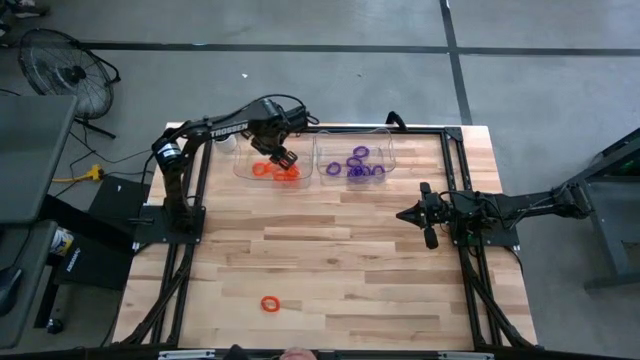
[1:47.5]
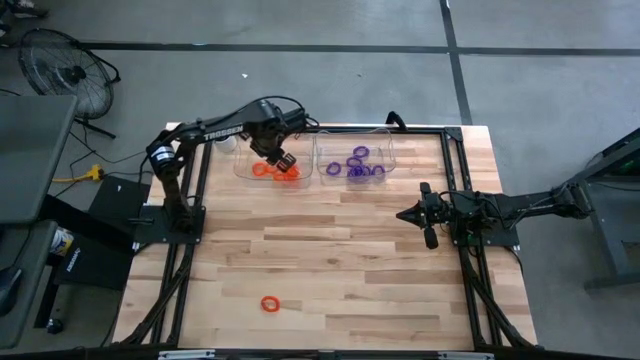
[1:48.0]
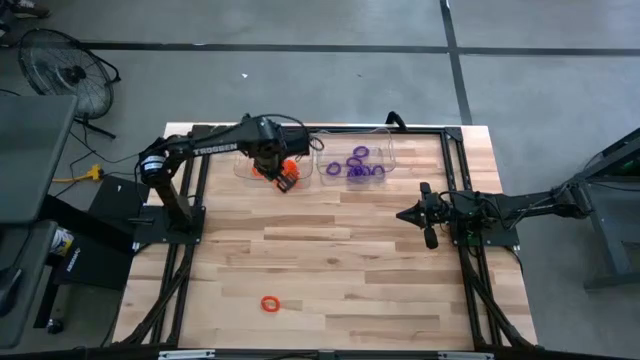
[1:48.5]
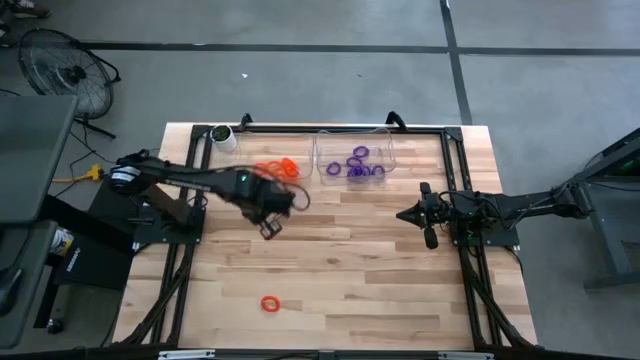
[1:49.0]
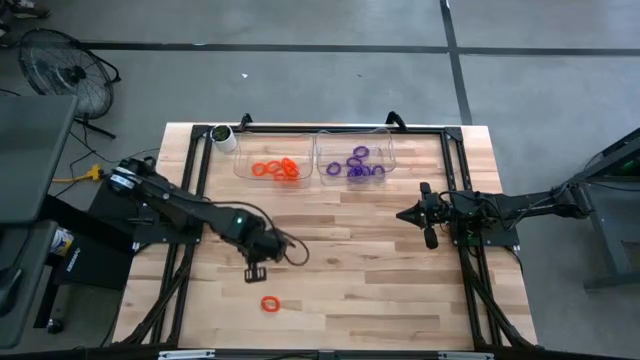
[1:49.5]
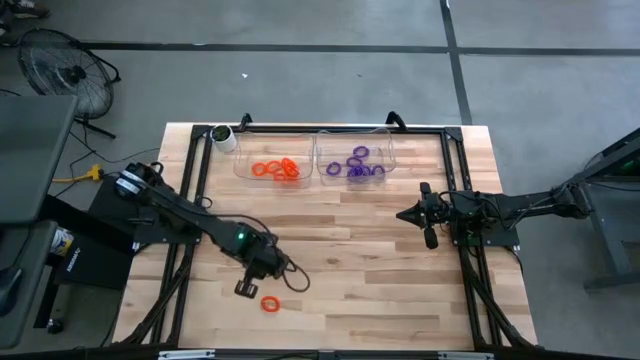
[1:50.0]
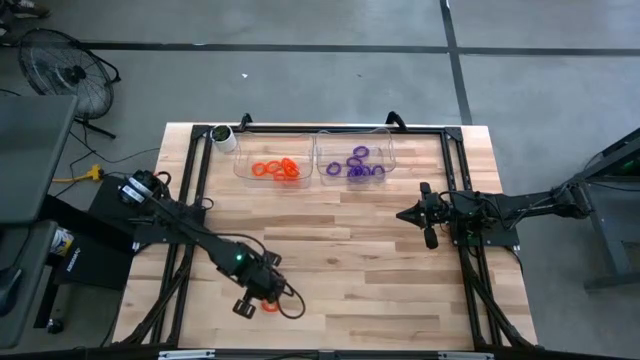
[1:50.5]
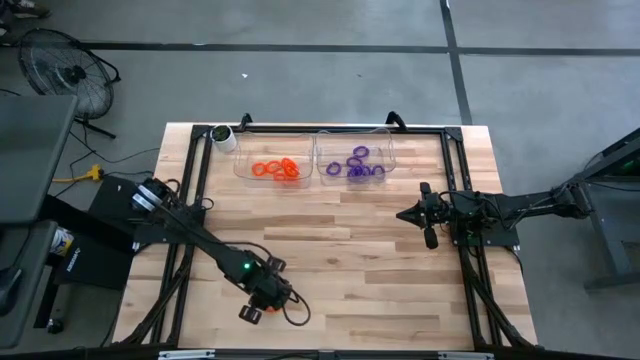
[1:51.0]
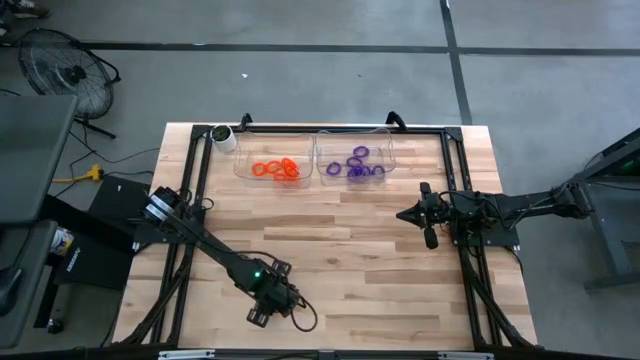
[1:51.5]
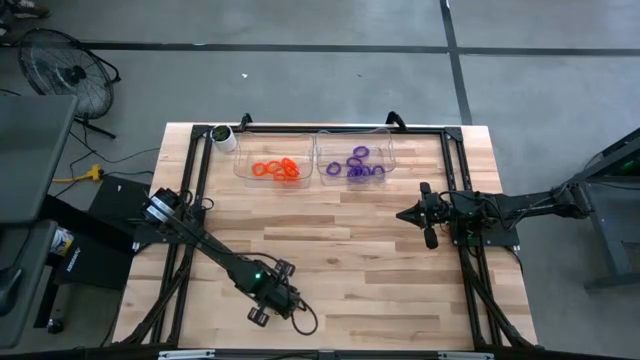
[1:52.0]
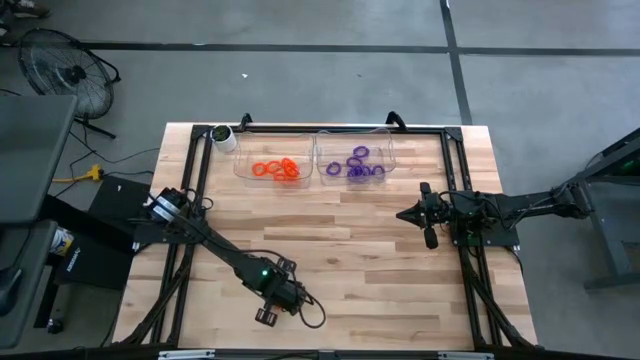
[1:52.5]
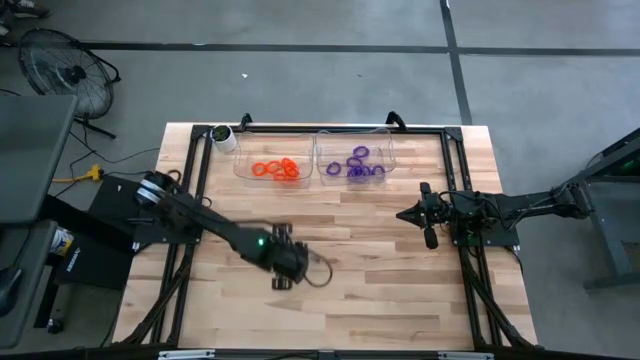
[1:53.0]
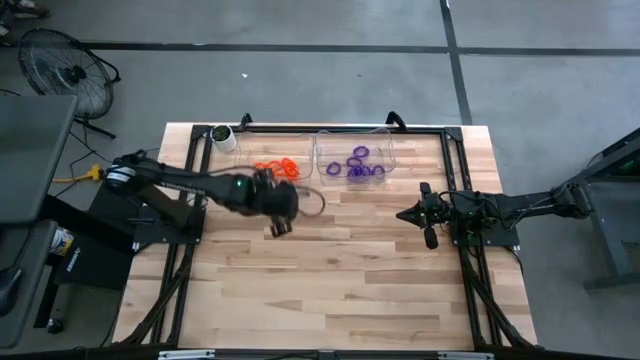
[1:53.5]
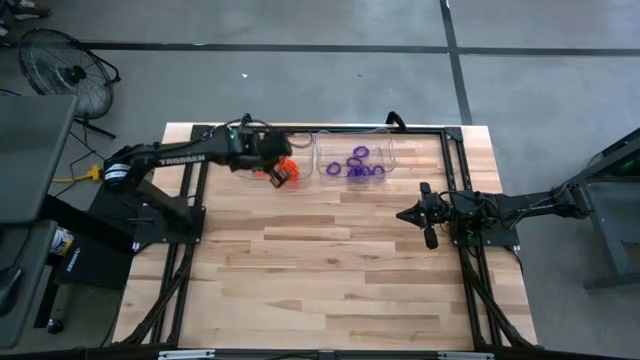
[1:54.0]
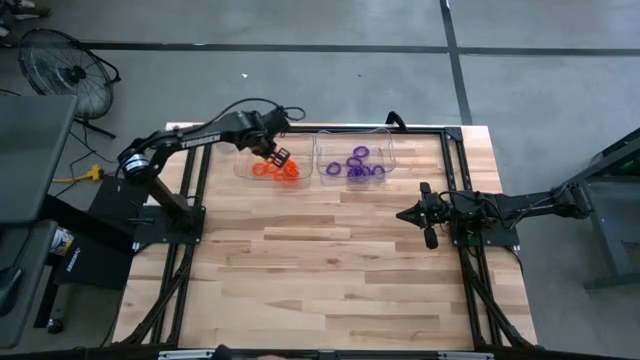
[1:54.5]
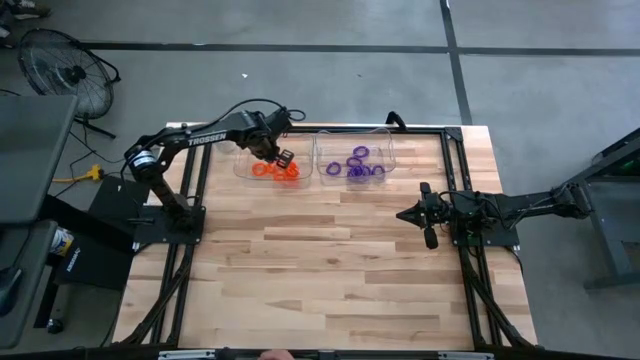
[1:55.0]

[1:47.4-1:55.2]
Task: Sort spring keychains
Put the orange spring keychain into the left bin

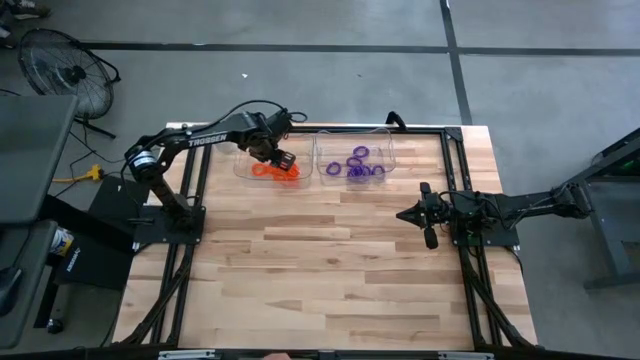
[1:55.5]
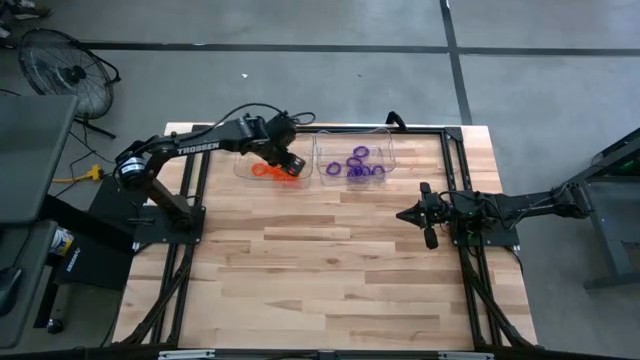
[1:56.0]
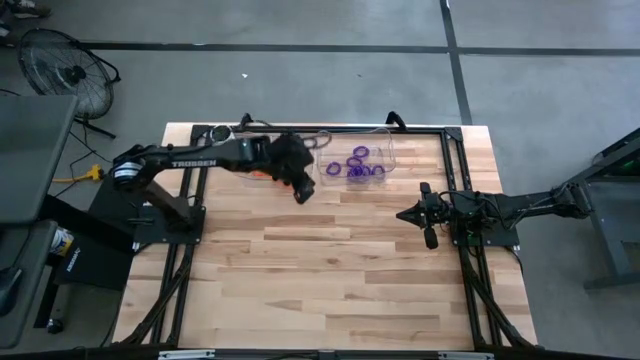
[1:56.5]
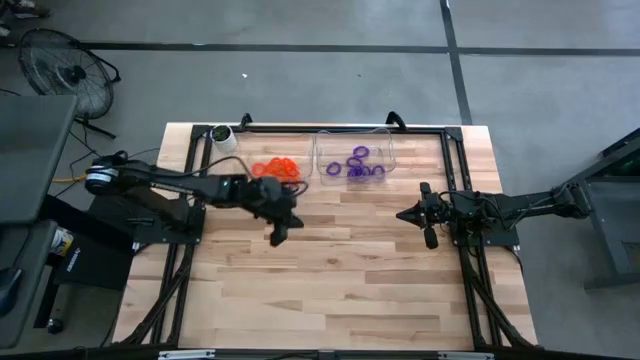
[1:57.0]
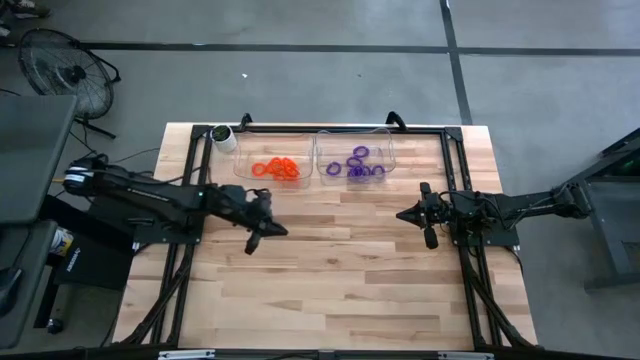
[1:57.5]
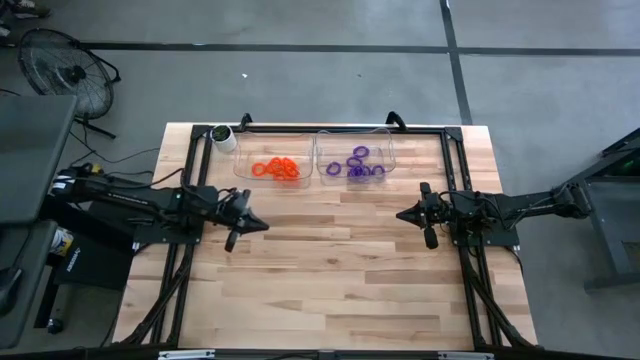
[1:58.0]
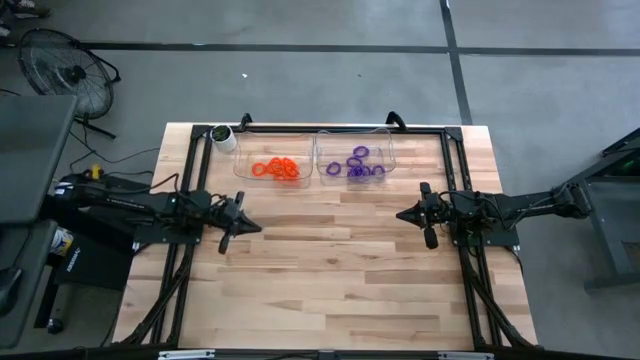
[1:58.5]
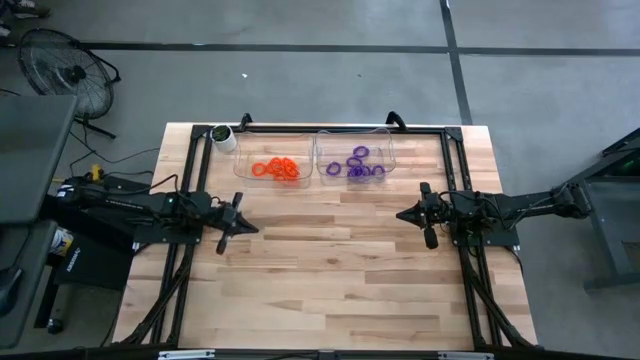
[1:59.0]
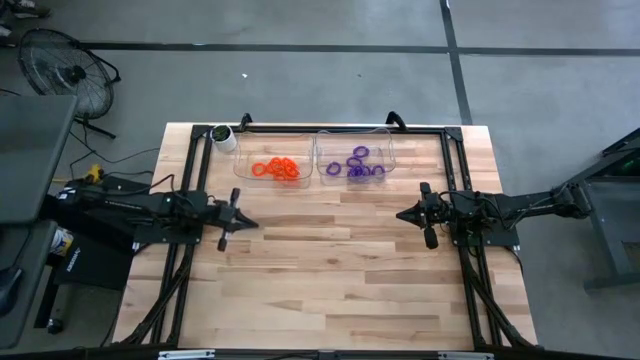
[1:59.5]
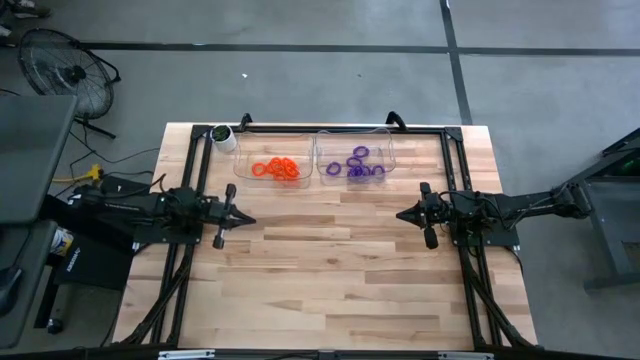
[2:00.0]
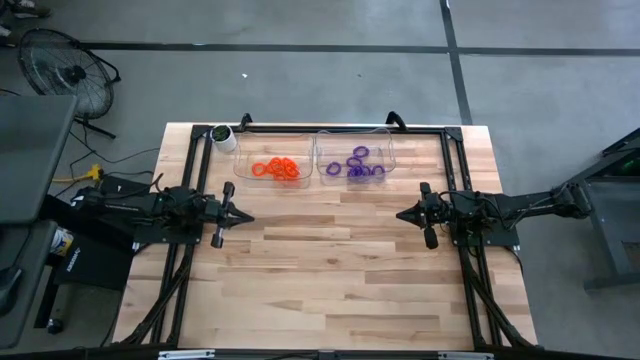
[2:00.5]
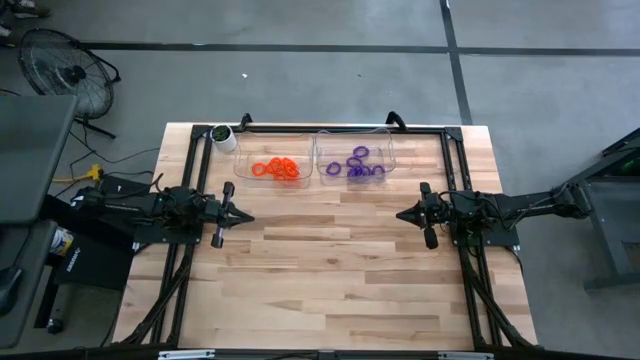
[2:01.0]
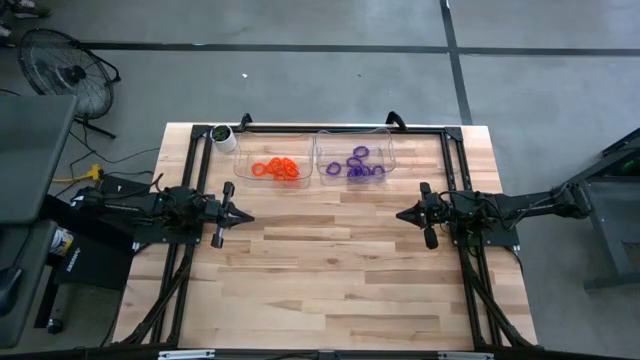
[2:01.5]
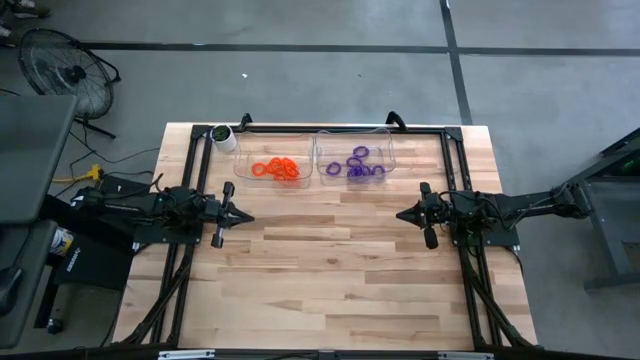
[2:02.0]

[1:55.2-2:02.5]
Return to Home Position

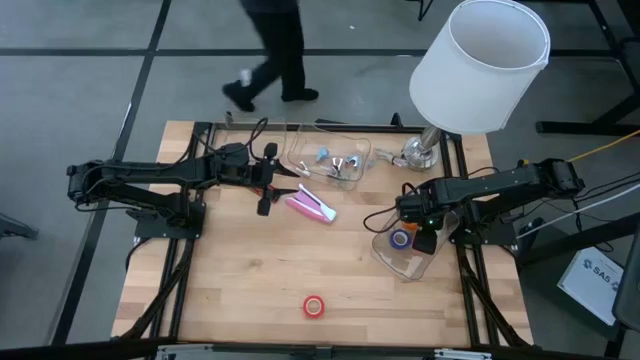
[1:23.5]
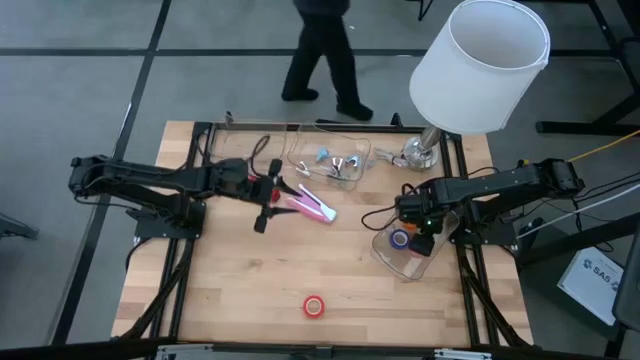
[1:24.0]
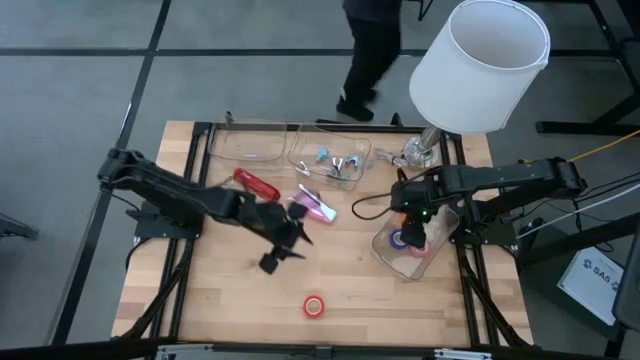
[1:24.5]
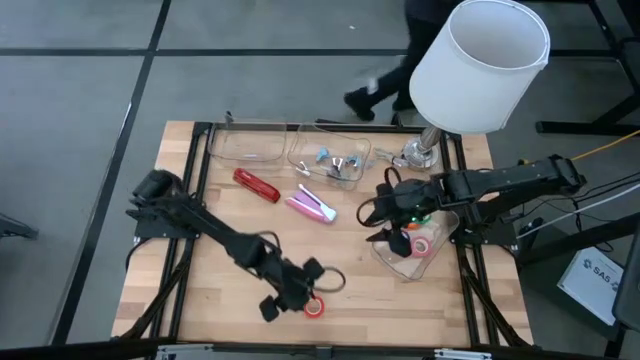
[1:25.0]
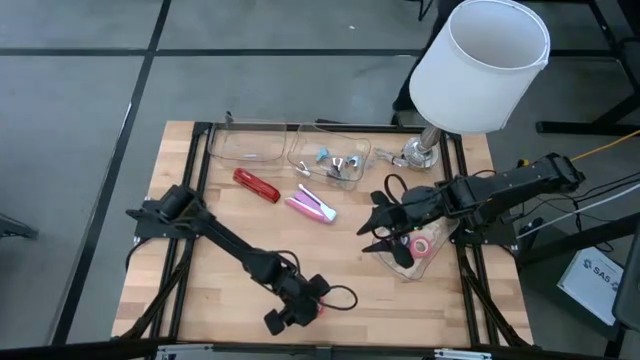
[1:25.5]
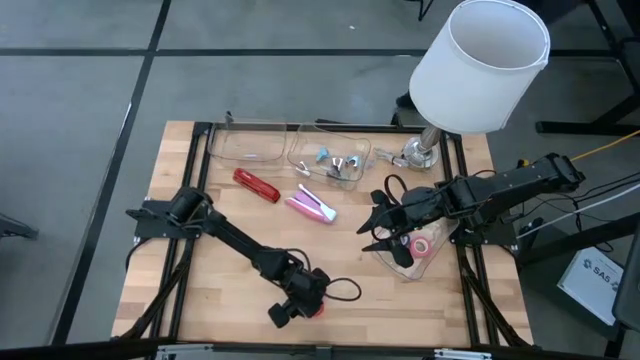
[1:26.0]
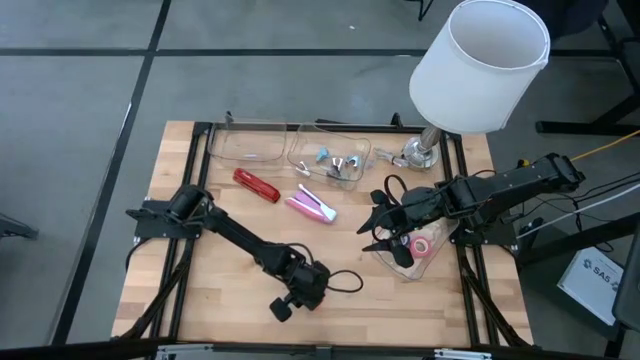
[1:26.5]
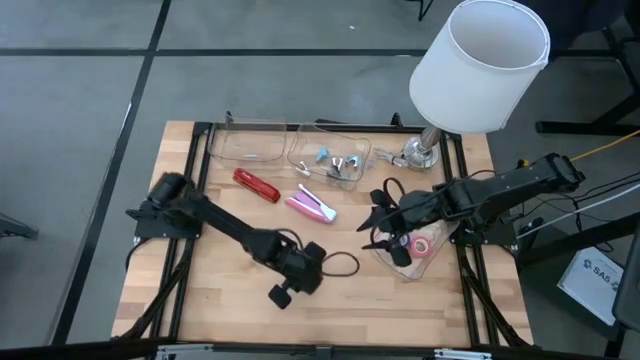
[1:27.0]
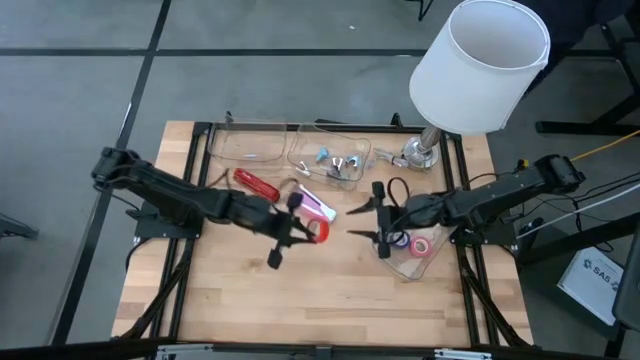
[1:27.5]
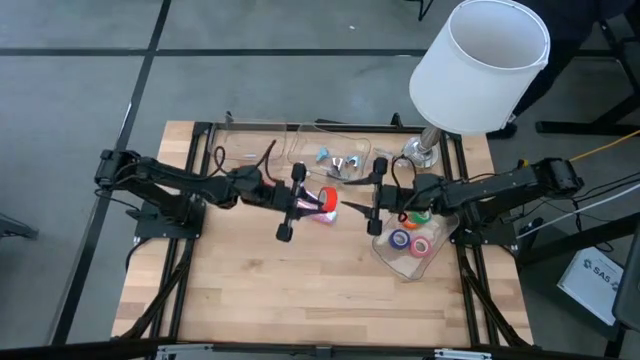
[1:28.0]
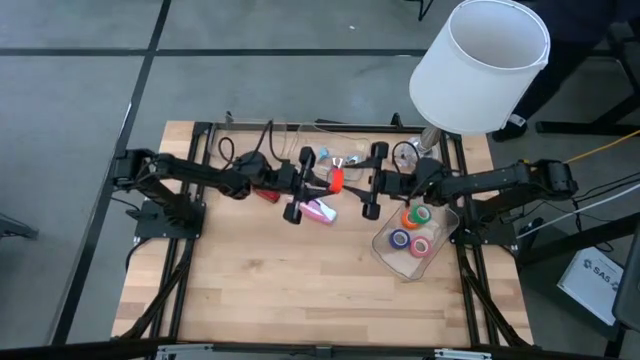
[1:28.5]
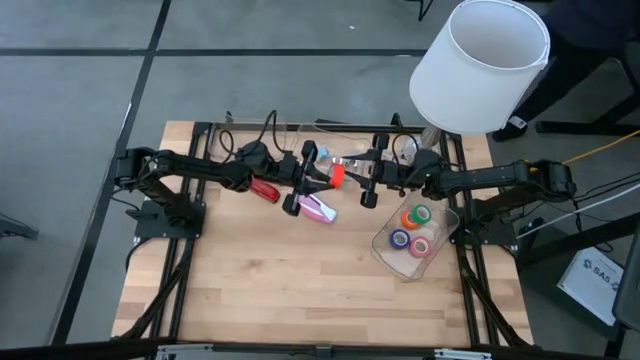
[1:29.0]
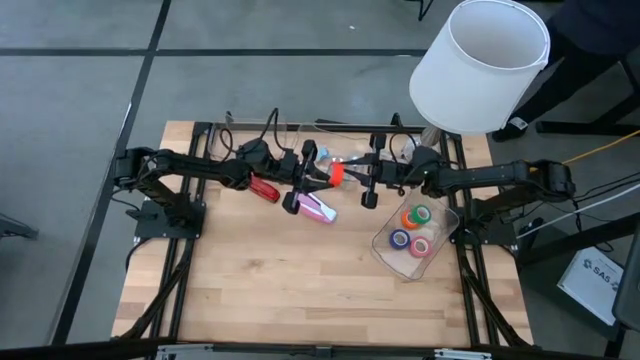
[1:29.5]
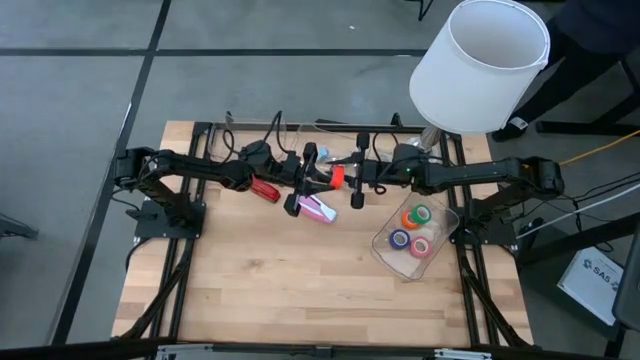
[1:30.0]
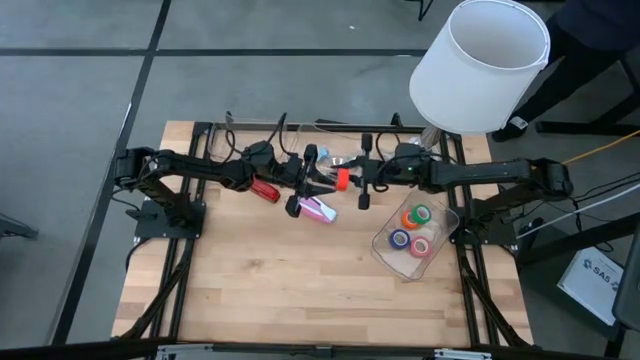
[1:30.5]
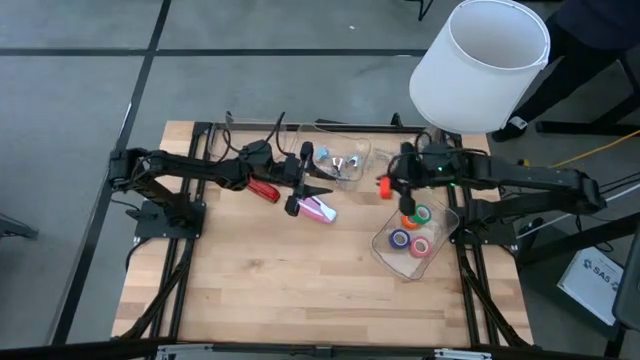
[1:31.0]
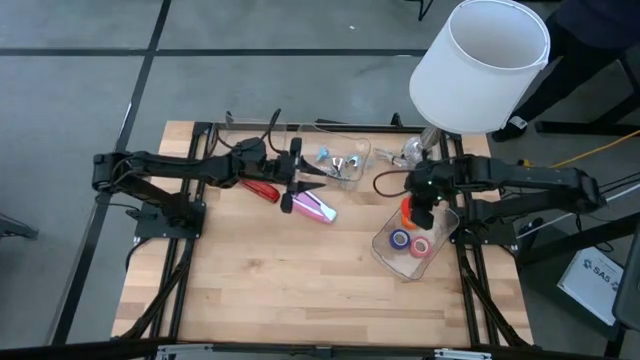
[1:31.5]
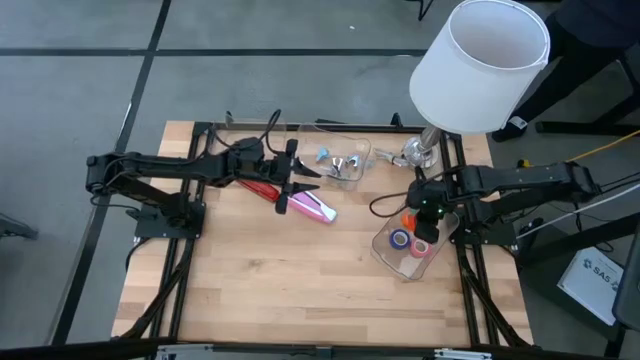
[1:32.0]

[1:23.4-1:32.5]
Task: Pick and place Stapler, Stapler remover, tape
Put the red tape into the bottom transparent bin
